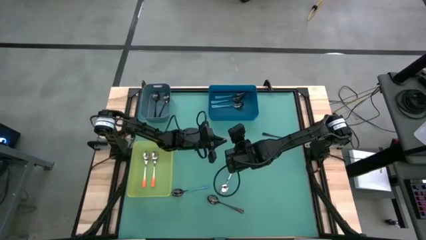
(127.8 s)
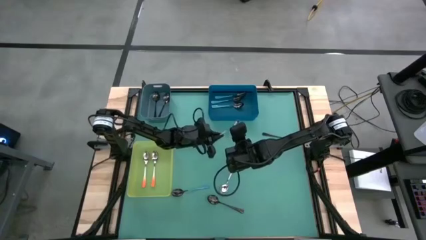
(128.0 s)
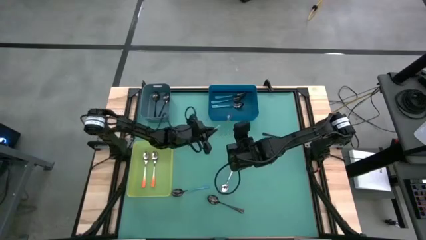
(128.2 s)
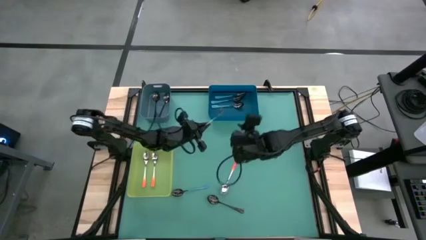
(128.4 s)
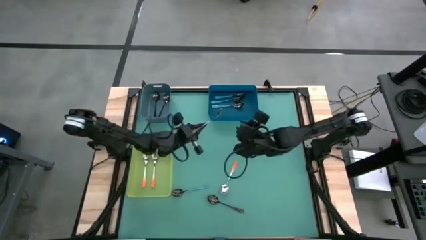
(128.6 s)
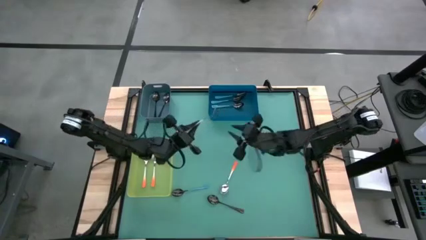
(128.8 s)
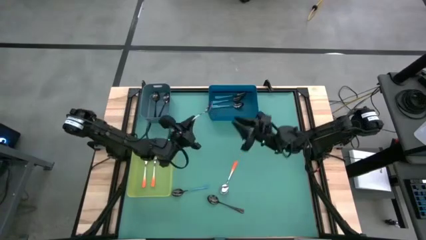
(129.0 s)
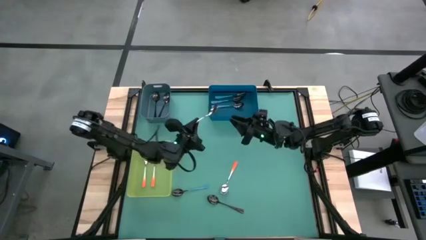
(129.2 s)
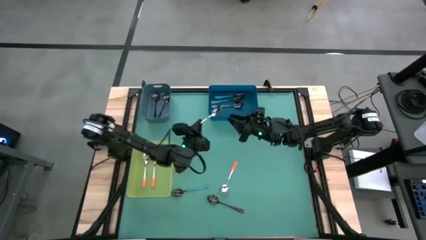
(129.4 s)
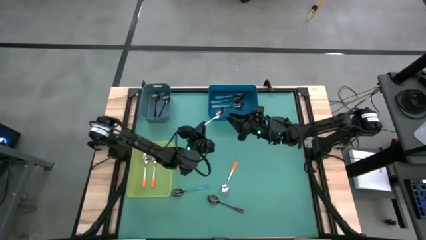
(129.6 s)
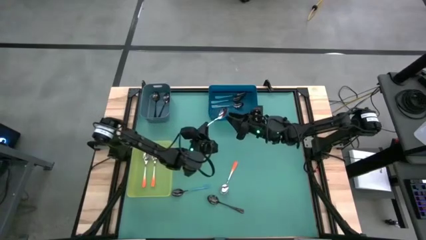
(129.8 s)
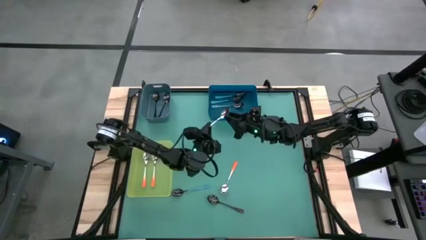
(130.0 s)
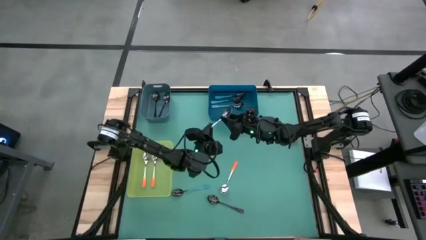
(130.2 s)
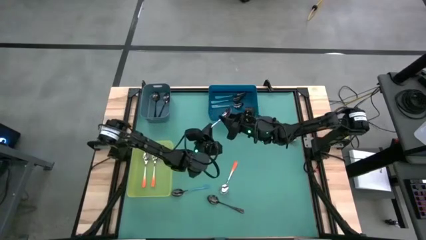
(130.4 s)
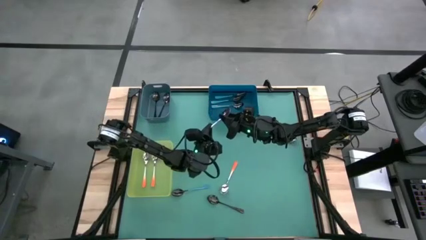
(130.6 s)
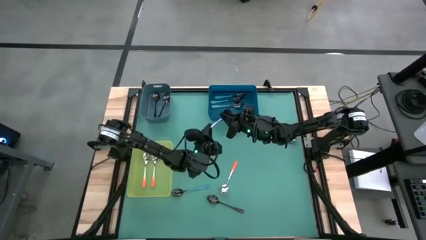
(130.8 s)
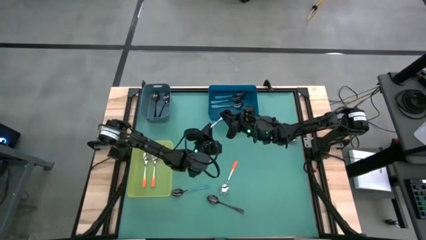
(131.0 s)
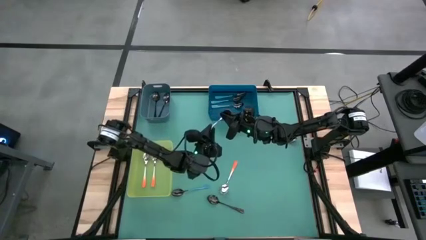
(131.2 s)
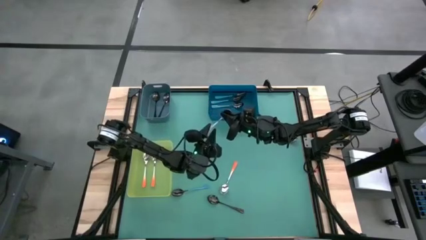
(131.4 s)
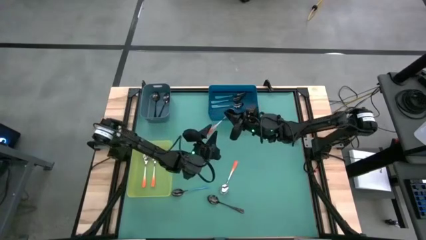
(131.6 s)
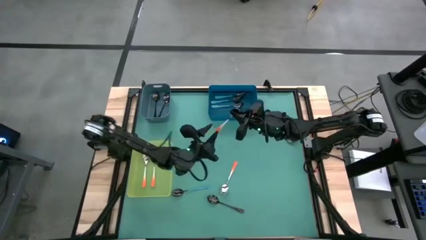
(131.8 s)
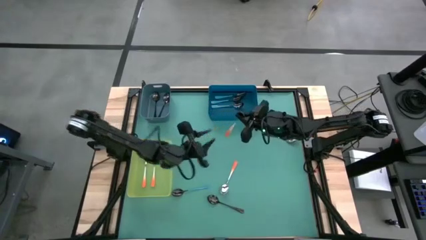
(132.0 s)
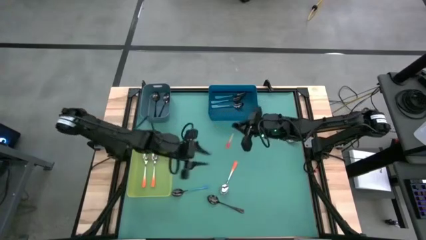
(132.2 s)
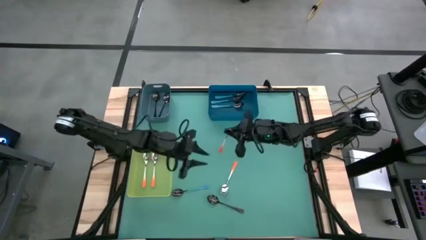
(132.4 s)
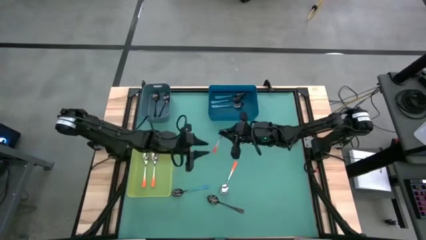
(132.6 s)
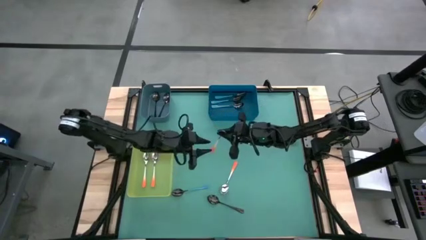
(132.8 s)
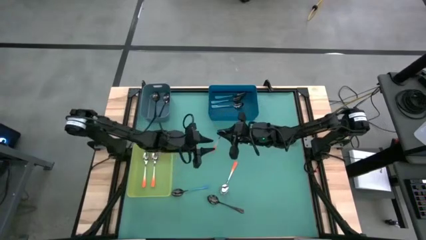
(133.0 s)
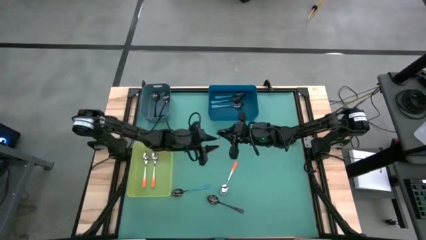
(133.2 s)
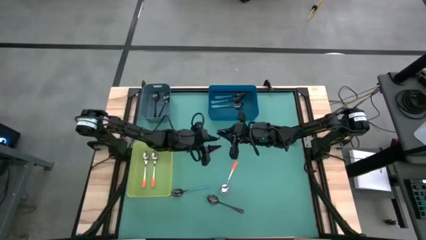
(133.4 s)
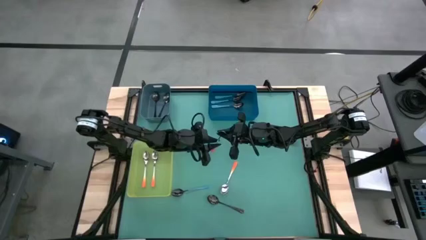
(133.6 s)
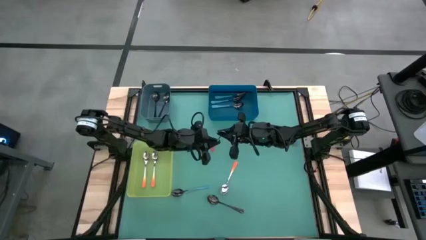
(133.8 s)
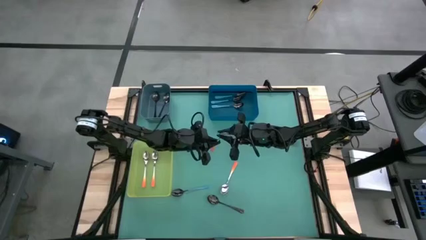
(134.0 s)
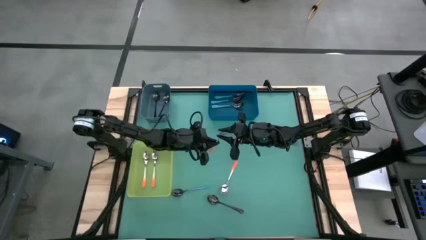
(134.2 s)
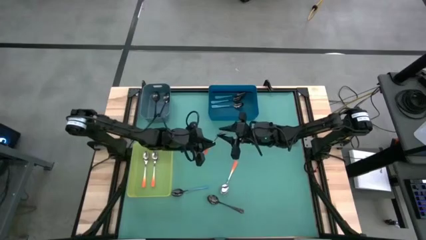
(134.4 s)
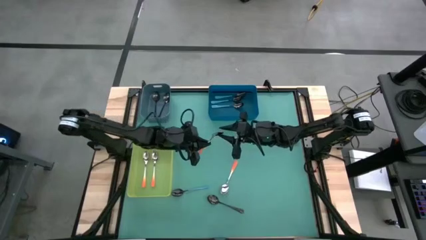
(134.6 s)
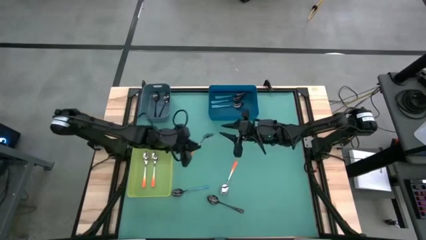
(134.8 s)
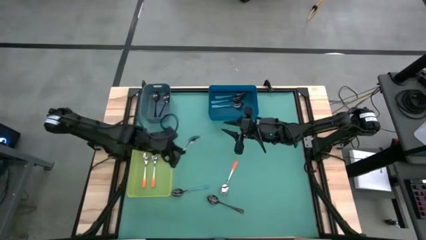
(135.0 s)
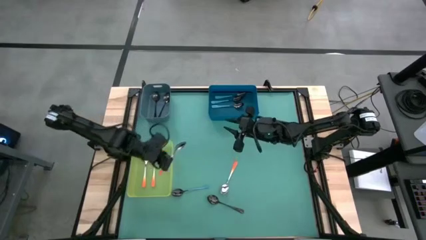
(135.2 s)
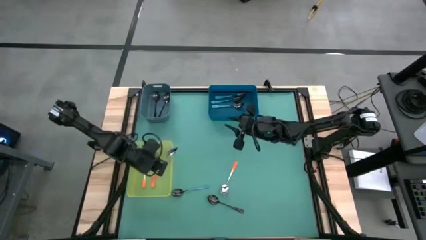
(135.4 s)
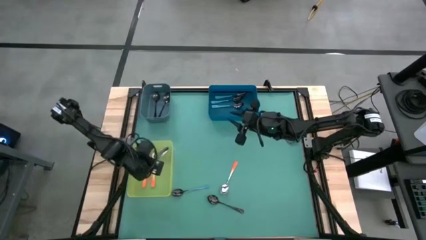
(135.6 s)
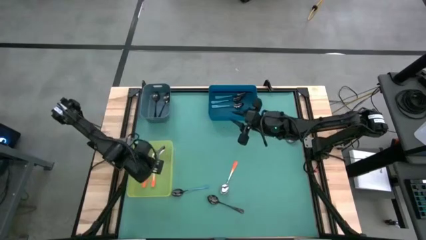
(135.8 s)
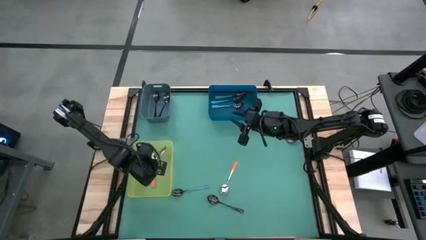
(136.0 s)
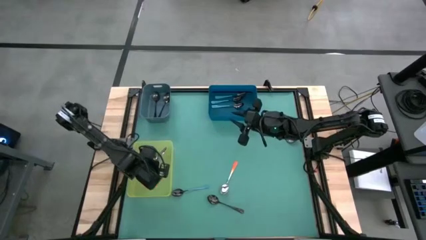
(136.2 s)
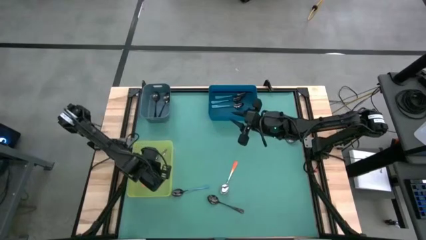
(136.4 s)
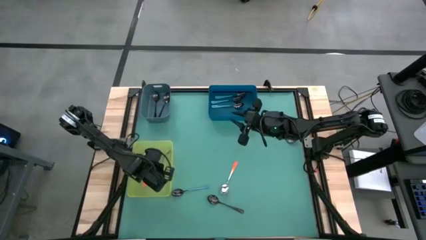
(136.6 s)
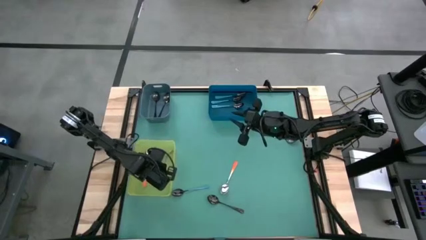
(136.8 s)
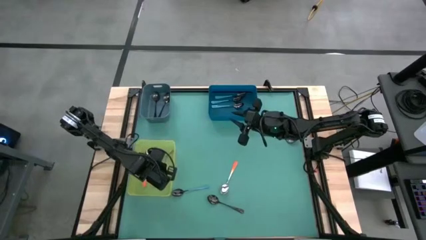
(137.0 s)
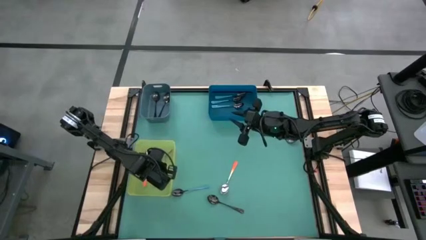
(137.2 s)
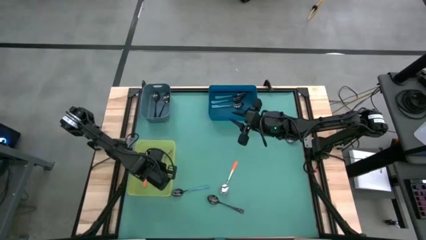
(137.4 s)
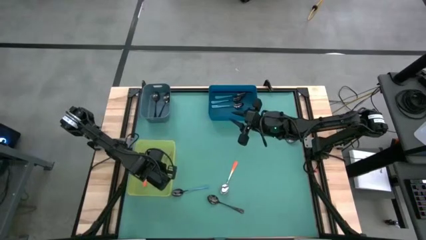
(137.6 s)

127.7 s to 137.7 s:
Task: Sort silverware by color (type)
Put the orange spoon into the yellow bin

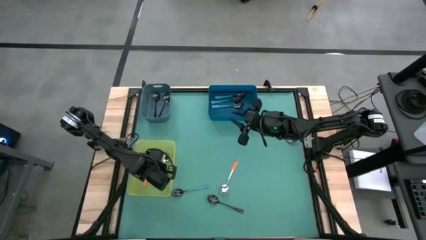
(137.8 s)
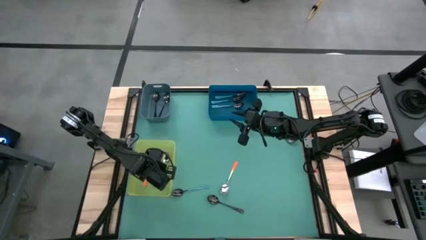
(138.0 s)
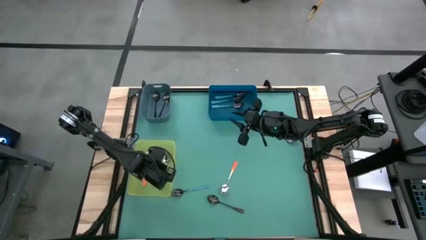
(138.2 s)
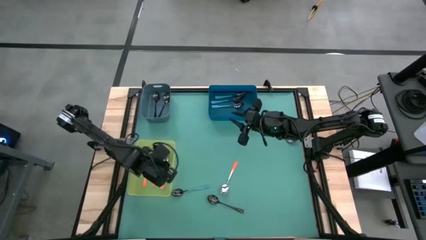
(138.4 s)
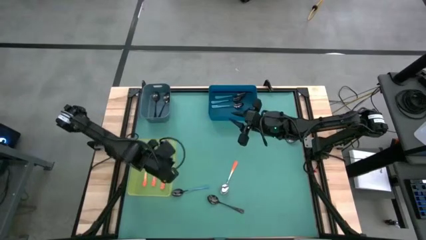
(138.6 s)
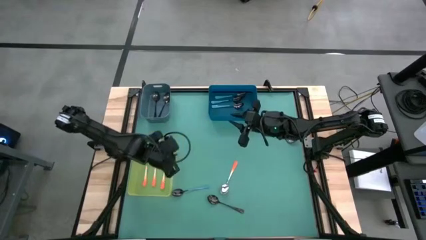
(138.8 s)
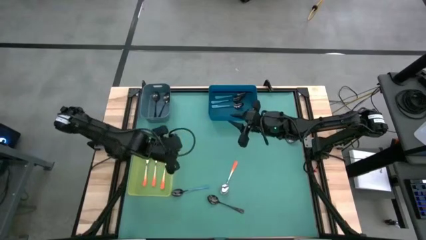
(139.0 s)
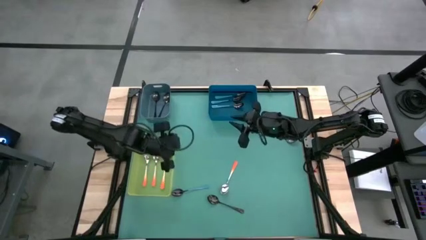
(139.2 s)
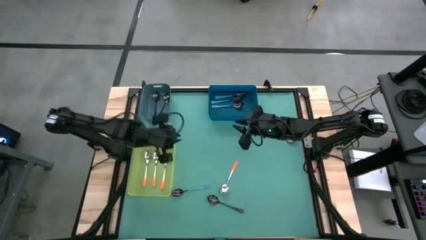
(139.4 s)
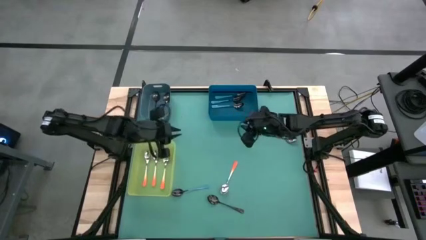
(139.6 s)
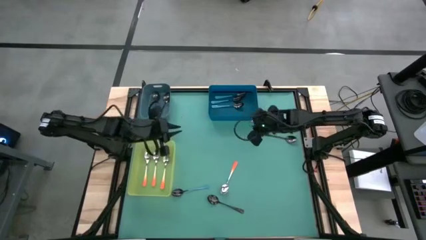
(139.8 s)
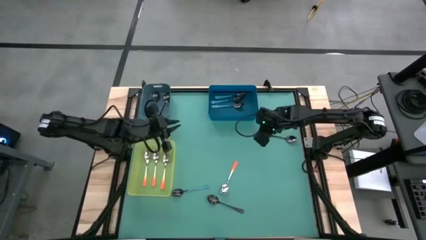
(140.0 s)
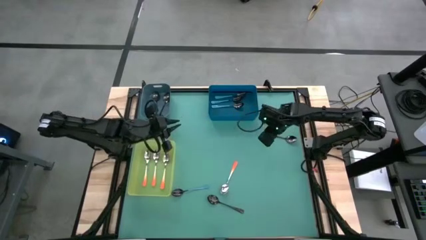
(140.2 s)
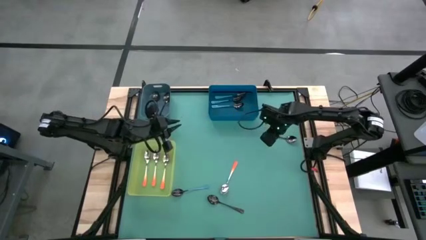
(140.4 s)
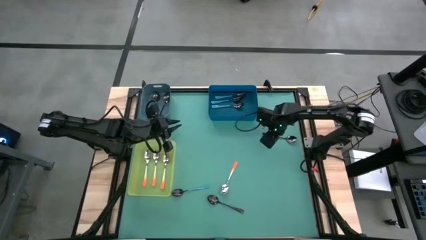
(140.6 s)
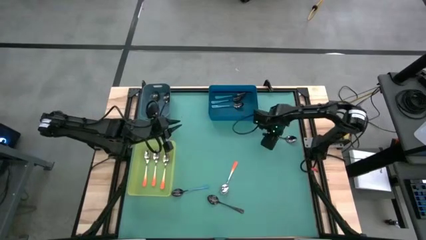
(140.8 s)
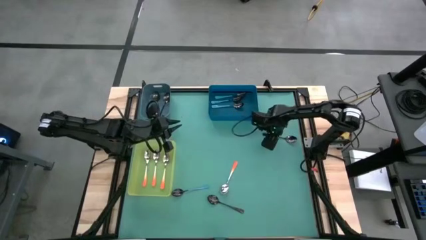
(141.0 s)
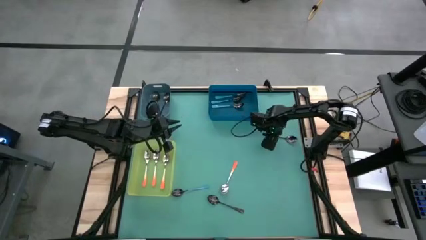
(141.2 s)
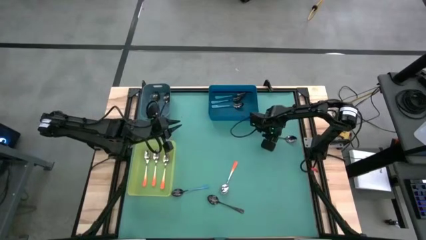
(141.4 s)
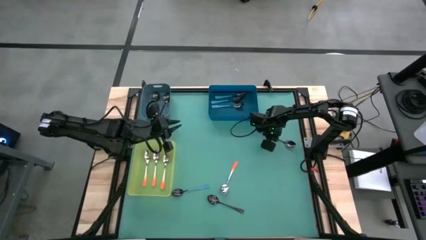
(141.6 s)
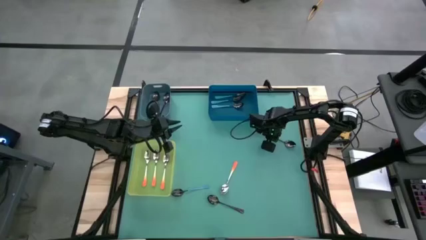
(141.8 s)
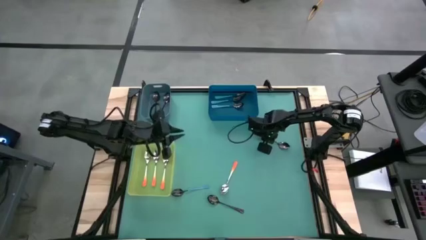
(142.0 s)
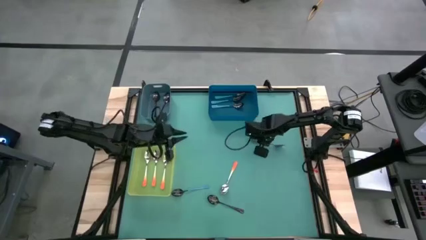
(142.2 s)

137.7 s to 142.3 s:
Put the black spoon into the blue bin
